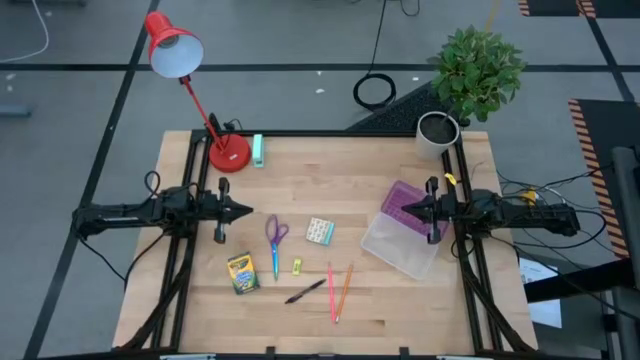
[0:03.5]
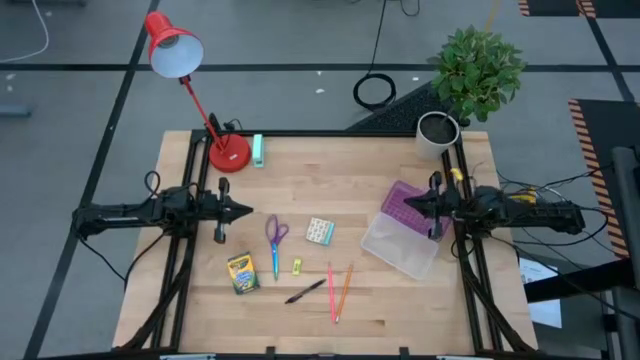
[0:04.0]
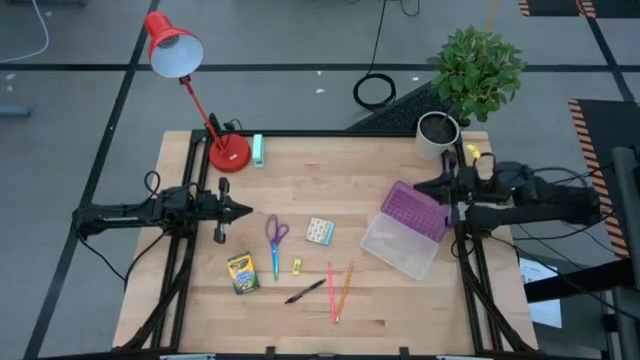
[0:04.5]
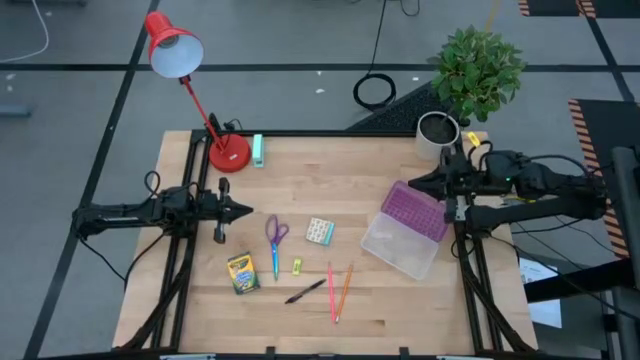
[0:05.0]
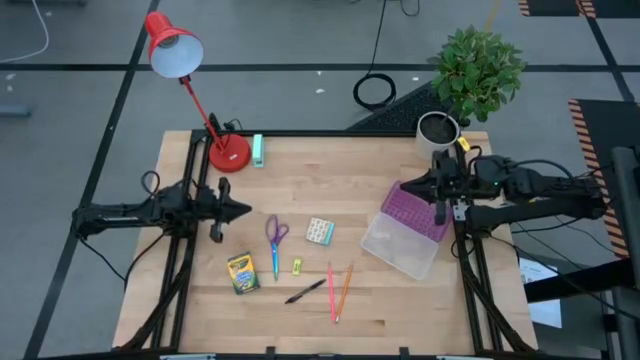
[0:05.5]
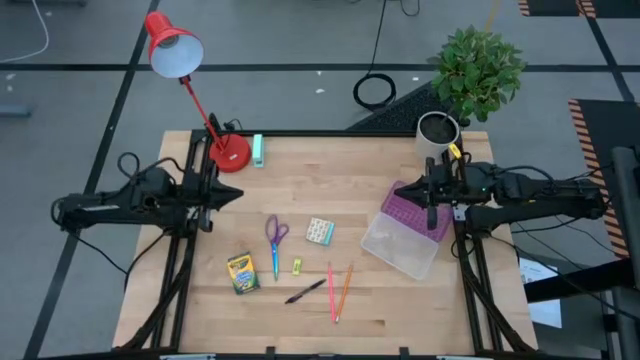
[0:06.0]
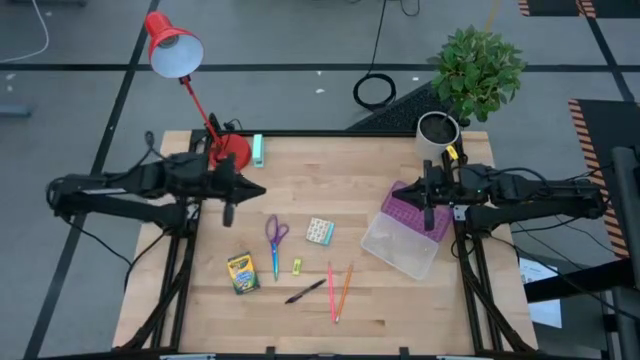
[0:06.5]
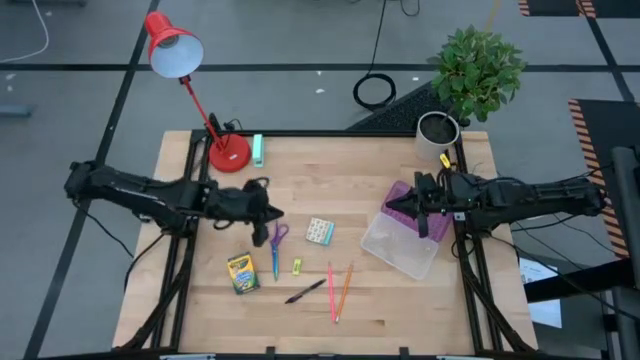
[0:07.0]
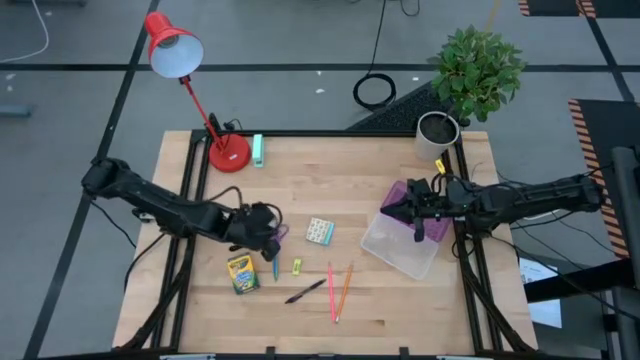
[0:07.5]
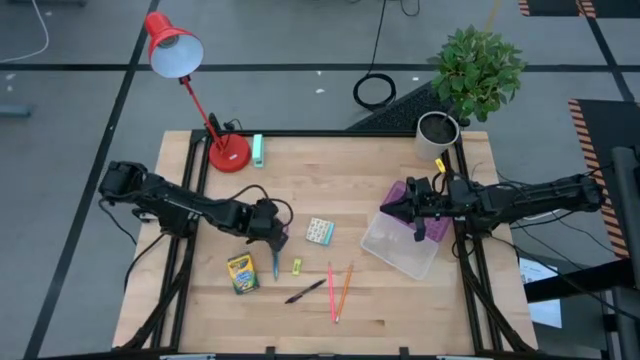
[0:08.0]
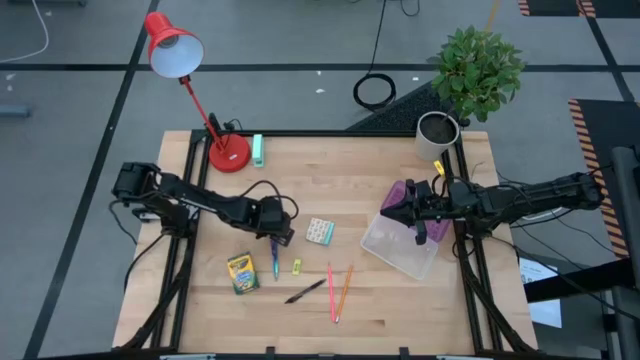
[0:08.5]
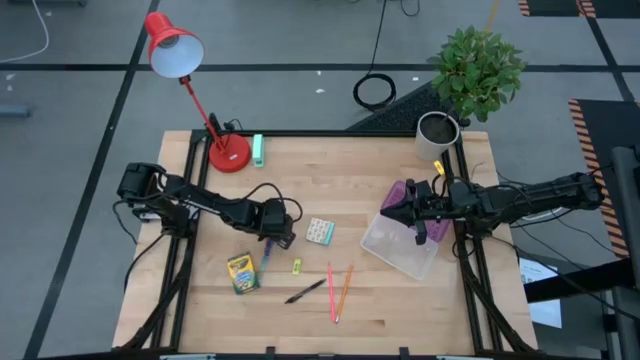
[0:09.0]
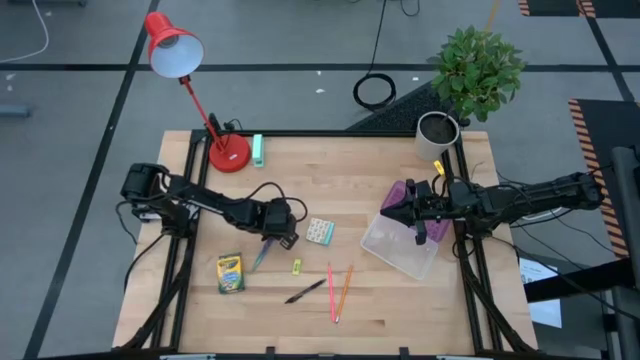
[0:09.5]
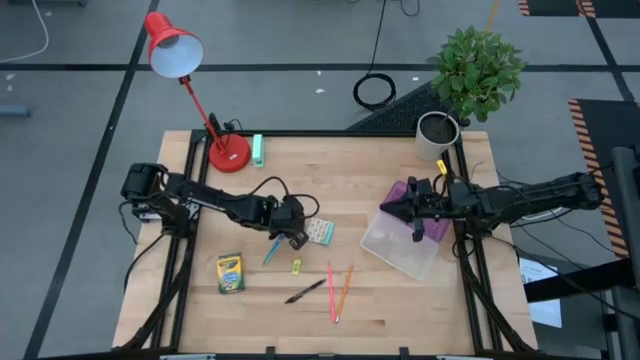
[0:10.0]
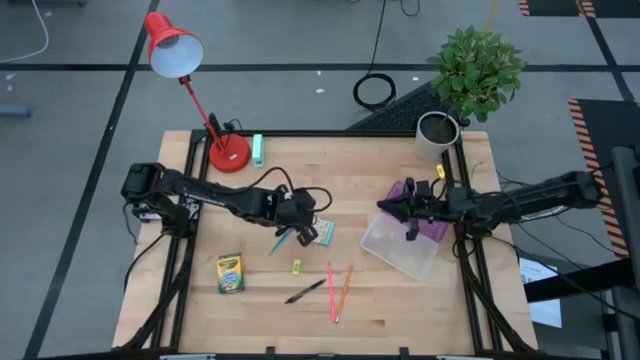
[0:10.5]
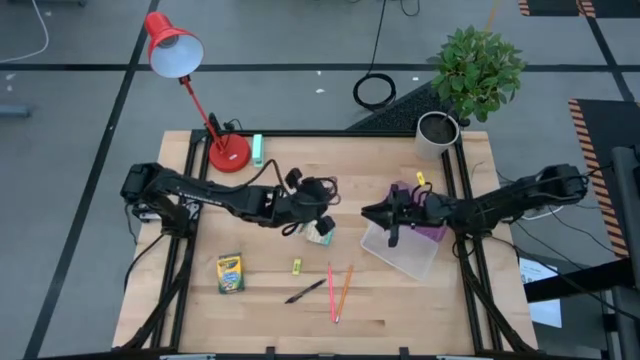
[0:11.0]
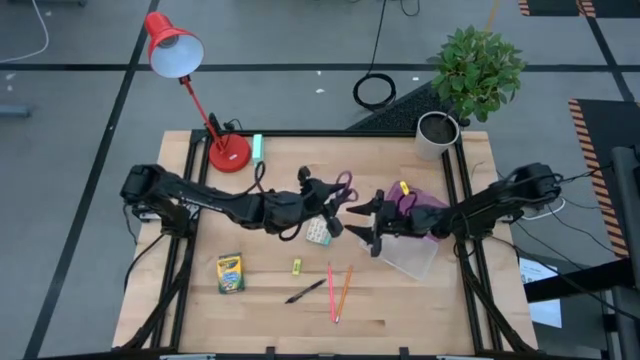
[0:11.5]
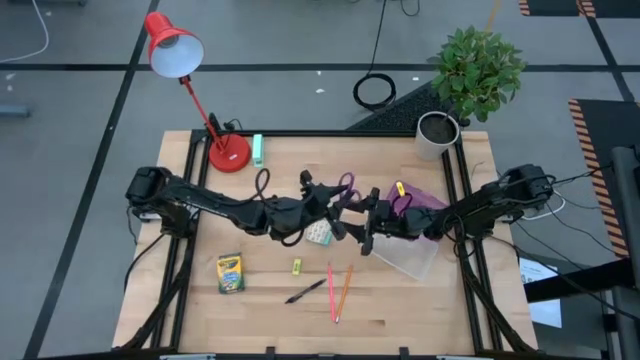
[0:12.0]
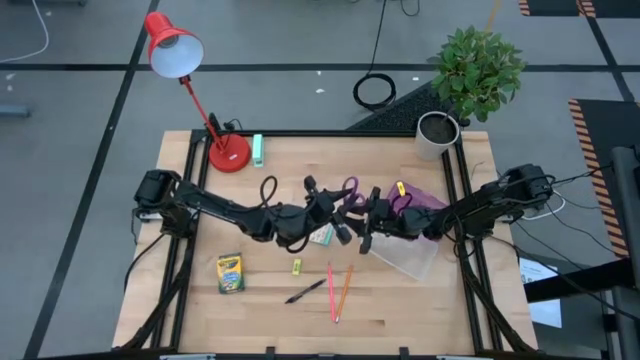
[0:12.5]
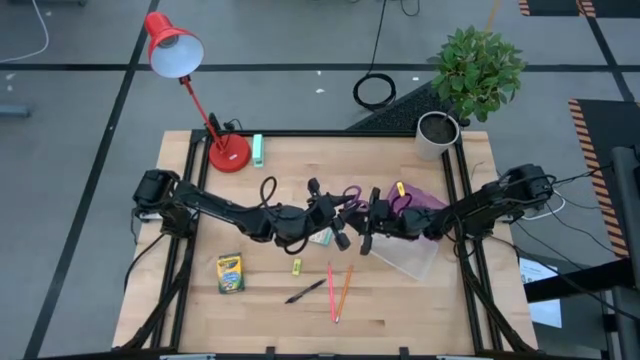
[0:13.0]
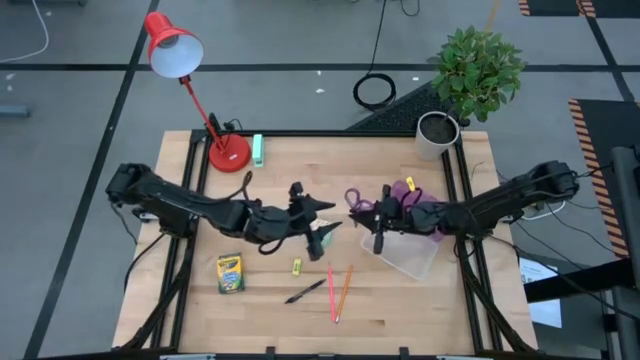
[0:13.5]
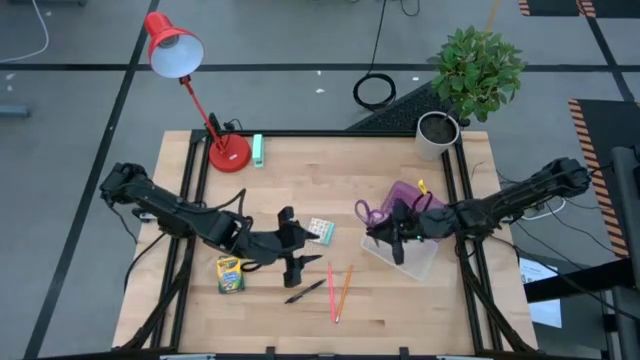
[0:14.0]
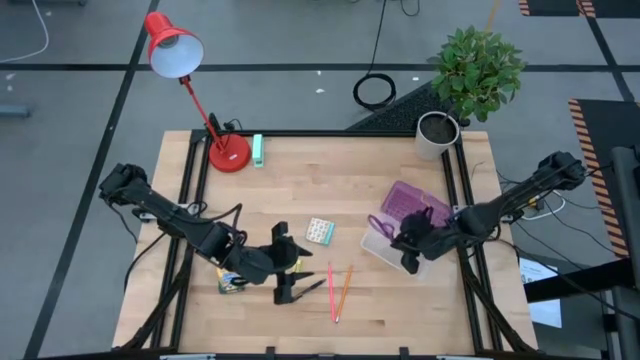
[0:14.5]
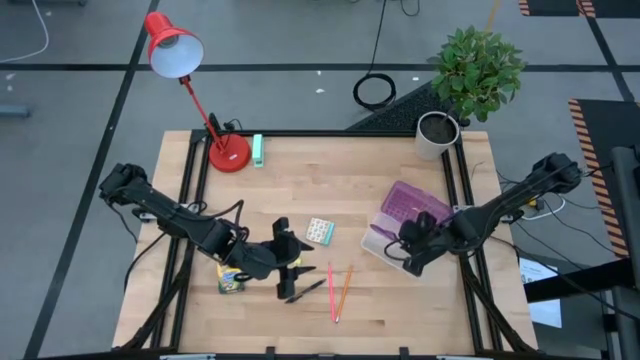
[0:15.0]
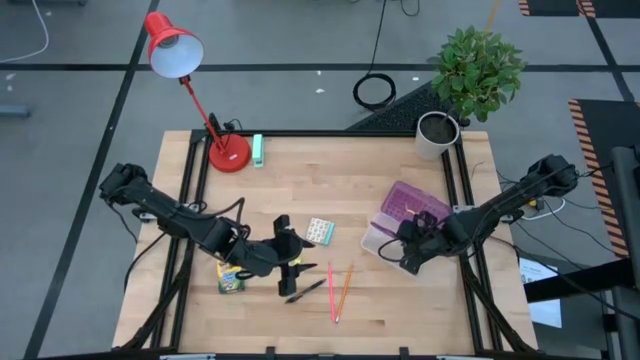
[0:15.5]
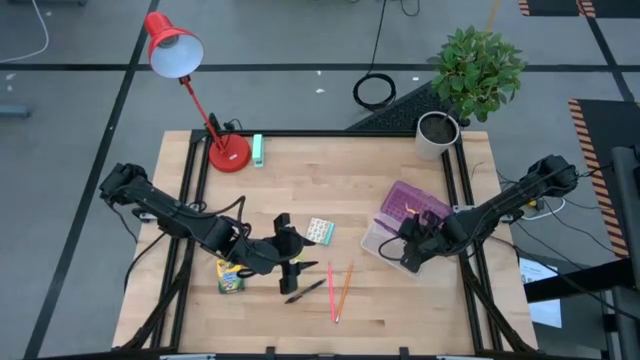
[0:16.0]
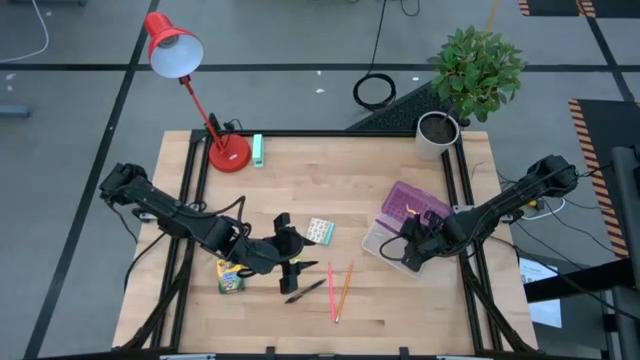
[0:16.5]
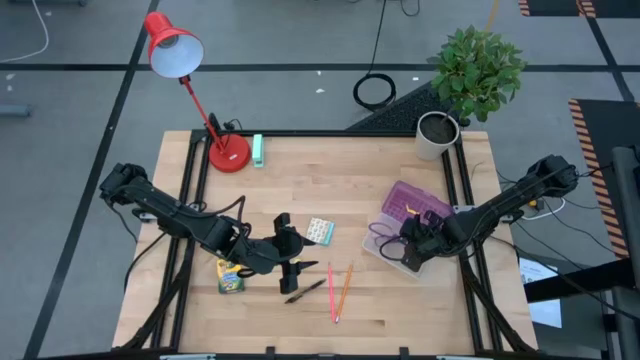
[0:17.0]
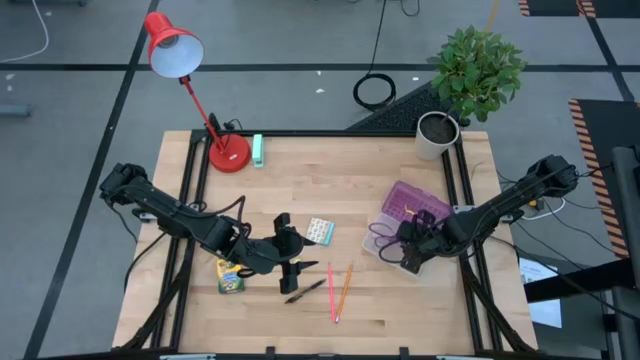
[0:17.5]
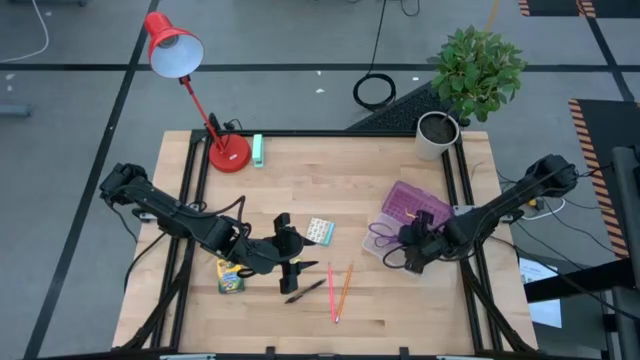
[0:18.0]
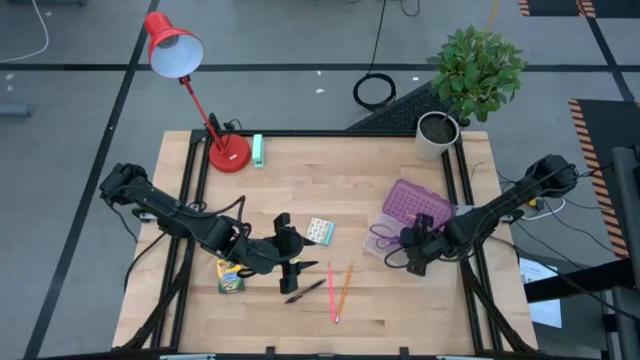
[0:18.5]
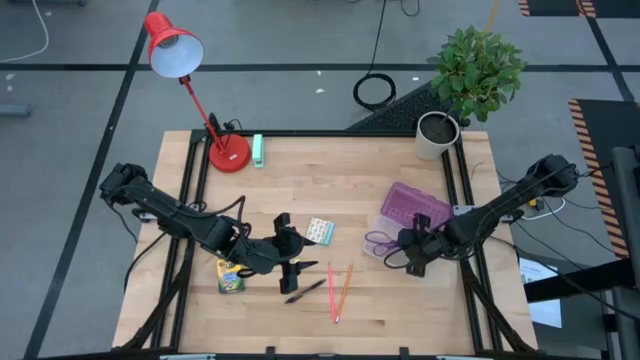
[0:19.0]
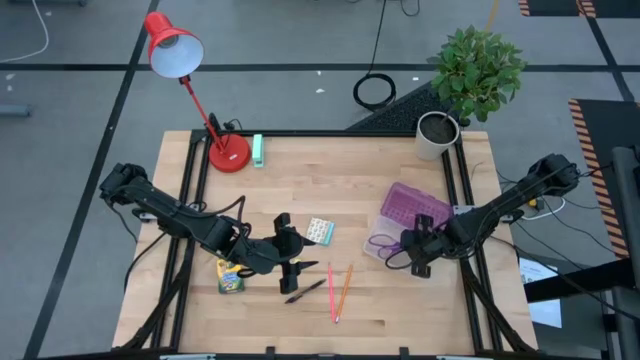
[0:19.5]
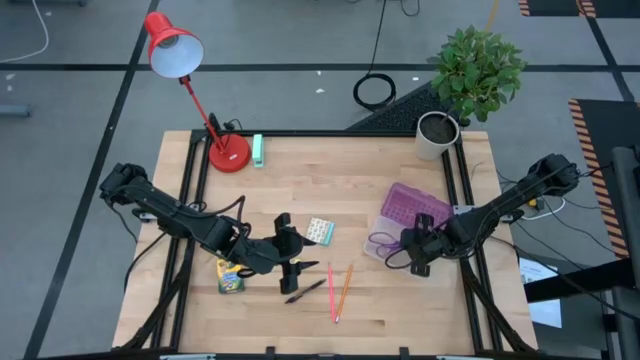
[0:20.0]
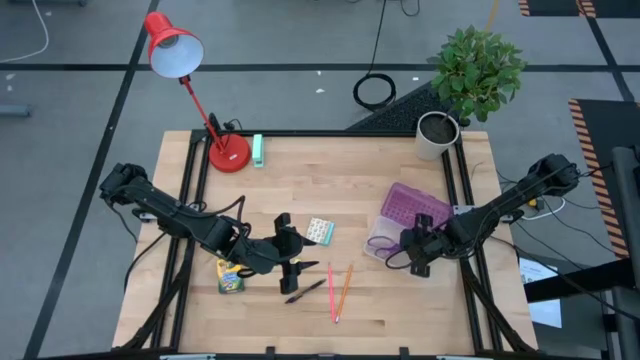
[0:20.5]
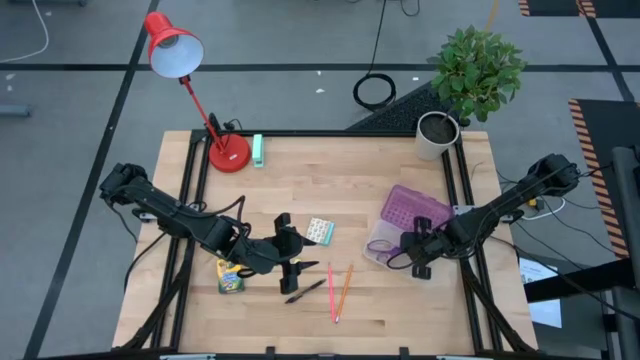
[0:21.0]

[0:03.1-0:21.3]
Task: Pack school essentials
Put the scissors into the supply box
